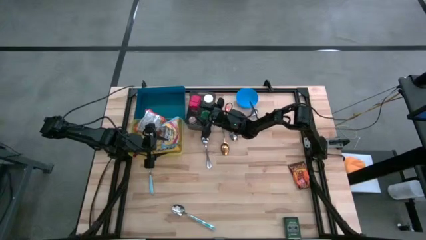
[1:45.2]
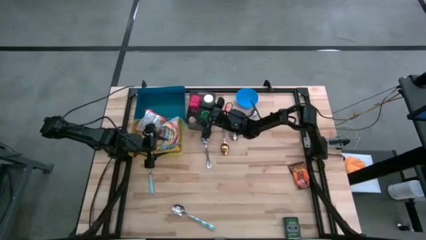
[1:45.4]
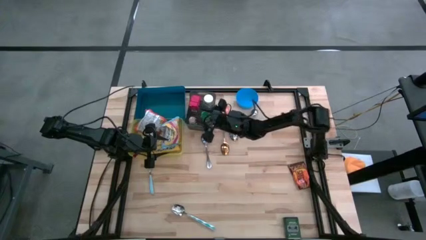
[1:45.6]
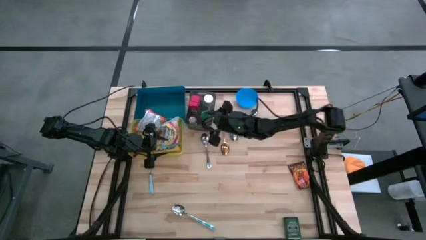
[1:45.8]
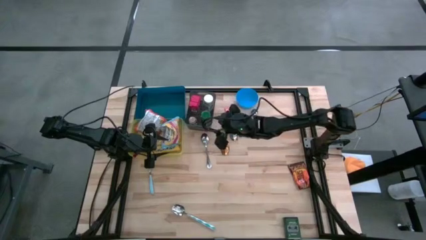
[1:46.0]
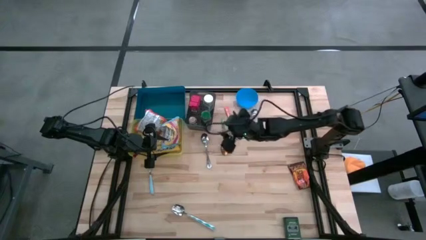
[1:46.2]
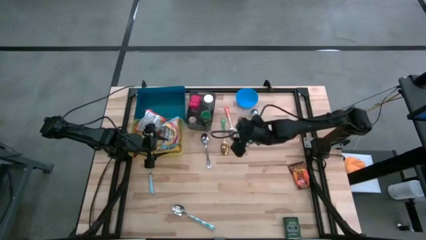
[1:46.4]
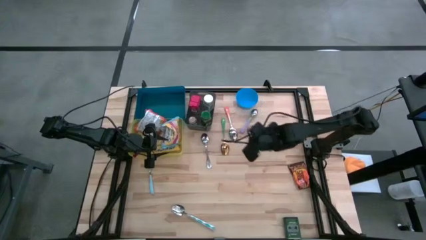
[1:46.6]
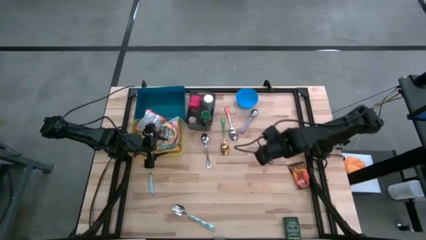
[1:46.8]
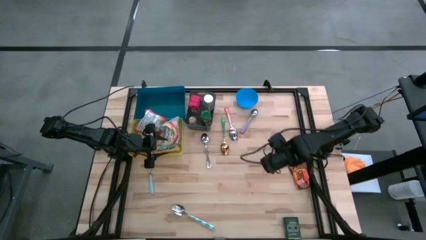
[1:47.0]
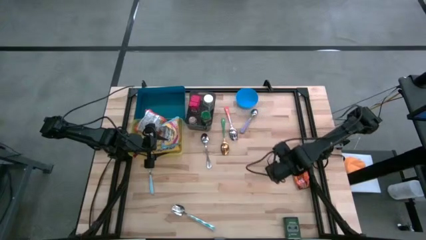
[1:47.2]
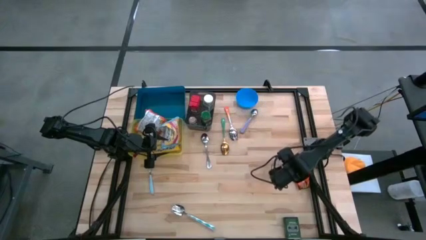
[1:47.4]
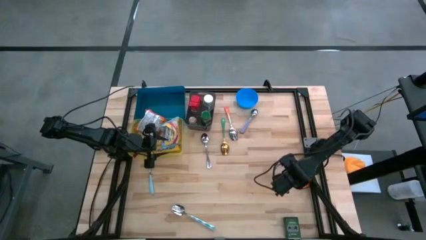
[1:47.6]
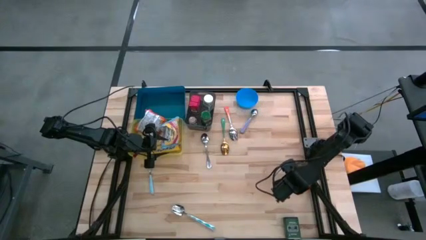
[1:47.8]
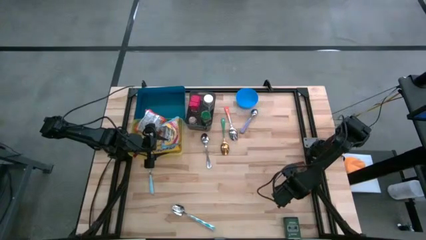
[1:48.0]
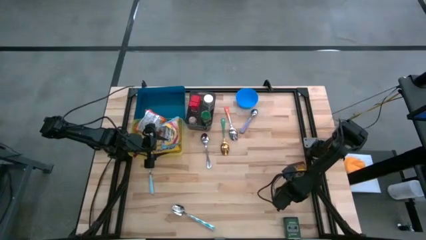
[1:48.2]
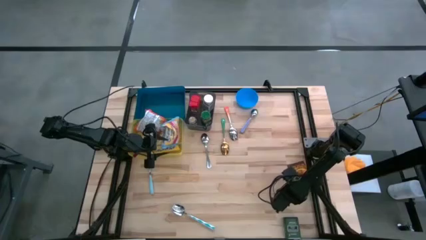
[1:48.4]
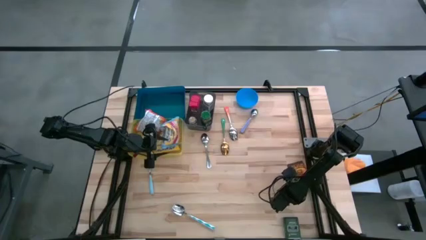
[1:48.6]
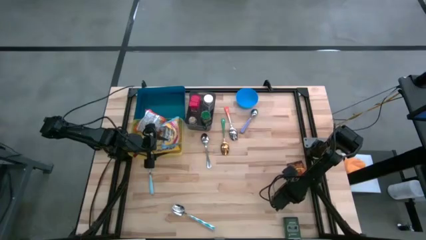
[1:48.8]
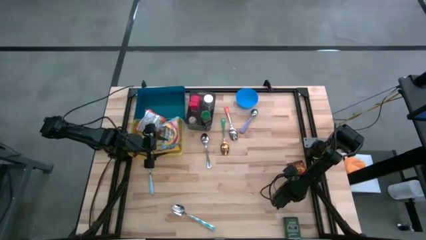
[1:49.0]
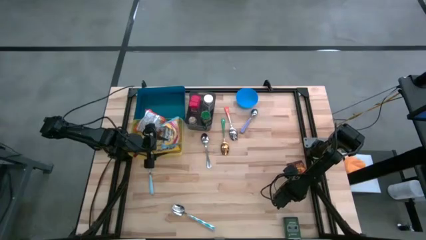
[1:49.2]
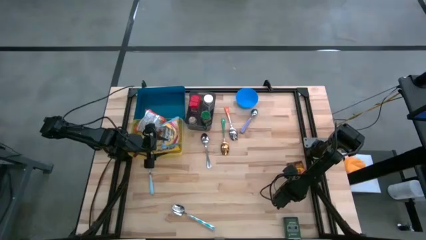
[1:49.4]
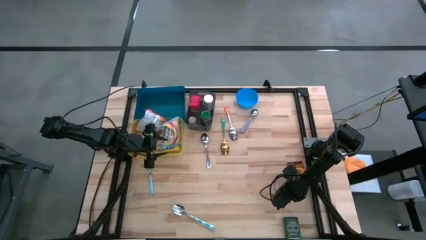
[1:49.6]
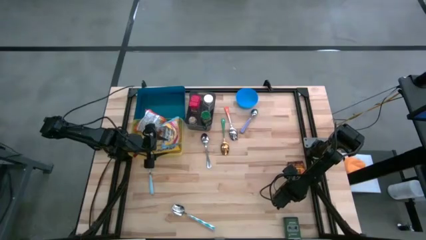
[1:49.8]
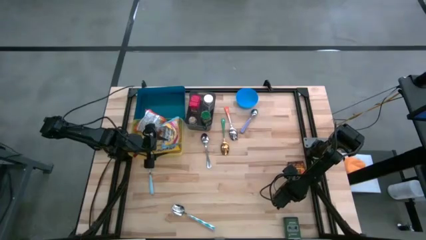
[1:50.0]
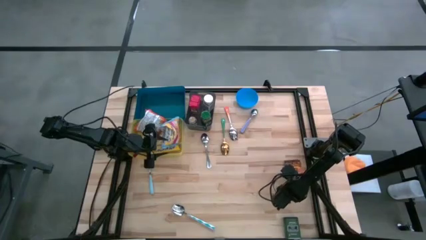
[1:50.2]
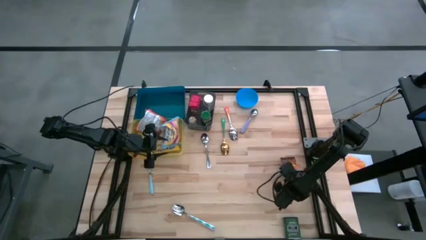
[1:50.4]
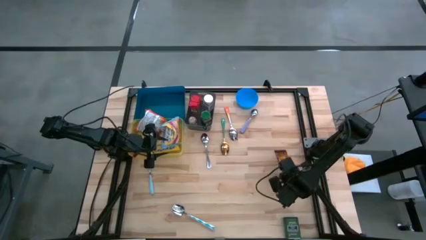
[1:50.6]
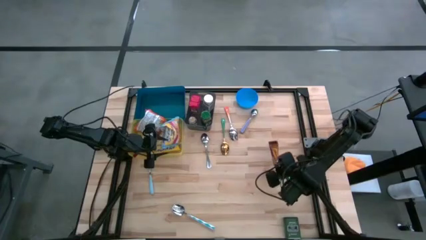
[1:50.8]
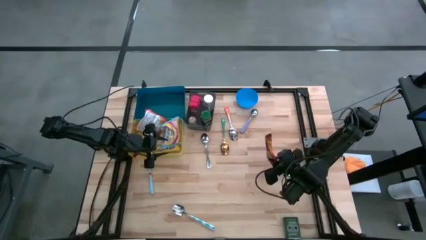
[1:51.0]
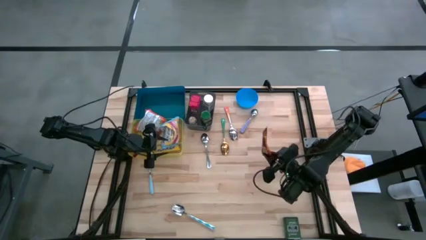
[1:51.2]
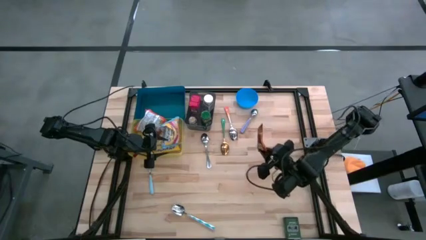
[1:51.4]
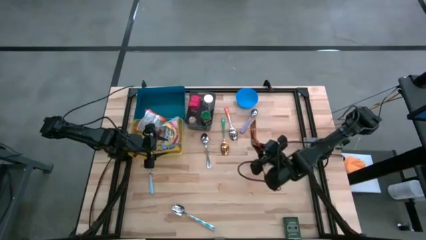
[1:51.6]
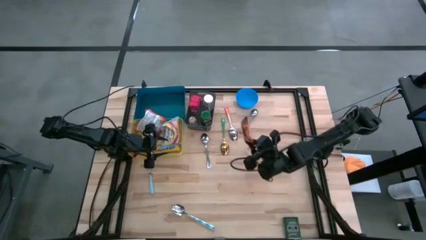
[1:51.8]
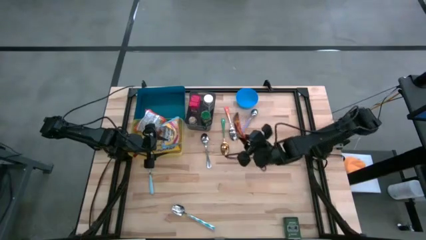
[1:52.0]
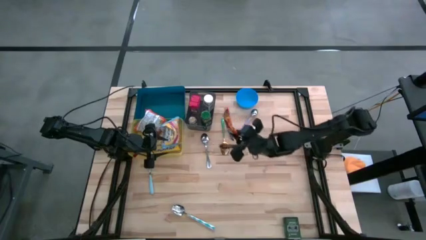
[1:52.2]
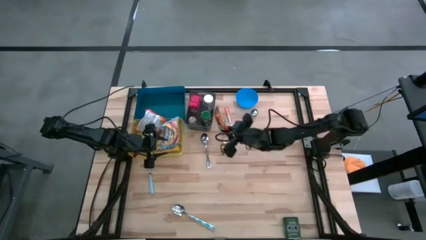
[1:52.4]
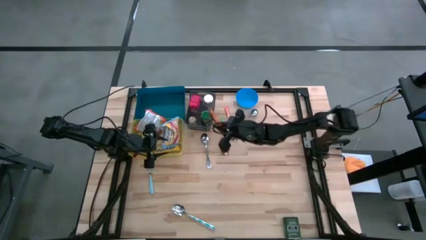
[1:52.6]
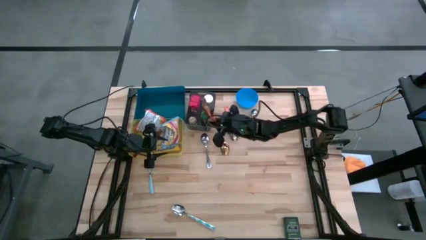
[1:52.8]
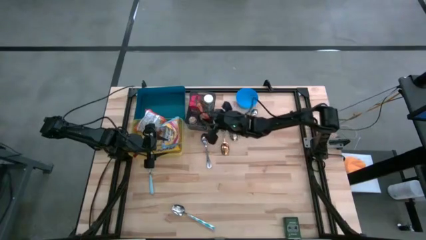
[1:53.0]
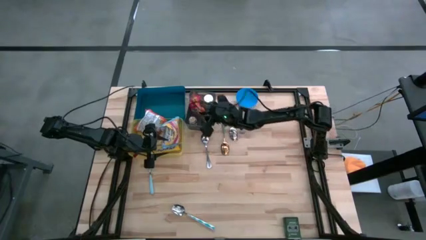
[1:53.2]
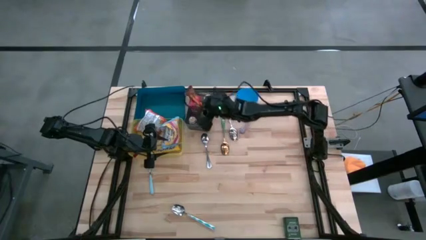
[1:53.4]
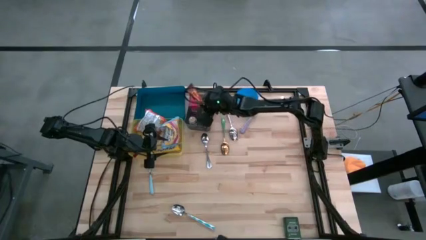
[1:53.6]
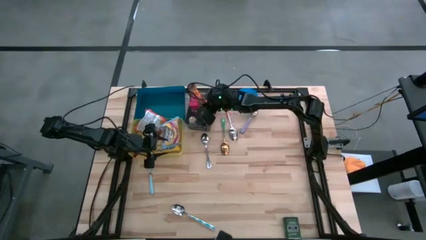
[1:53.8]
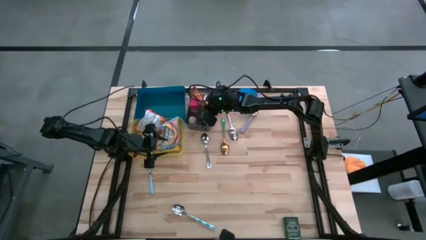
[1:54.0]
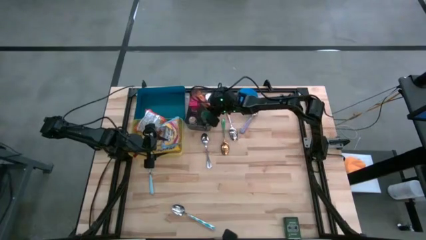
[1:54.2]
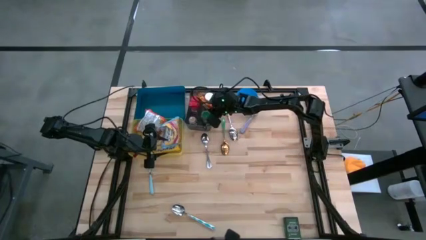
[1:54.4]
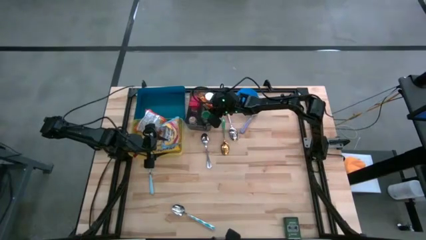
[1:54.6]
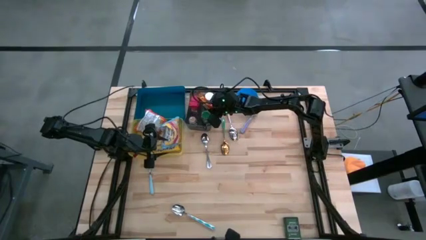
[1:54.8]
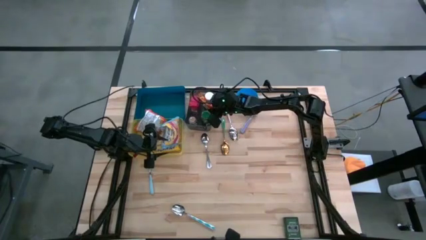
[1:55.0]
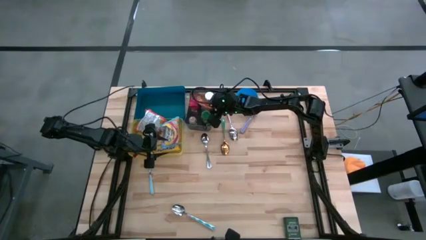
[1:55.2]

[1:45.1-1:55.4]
Put the orange seasoning bag into the black bin

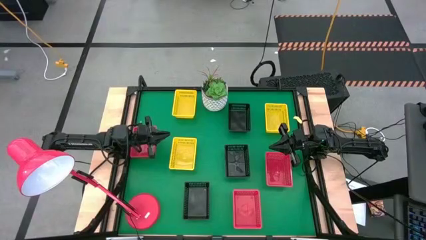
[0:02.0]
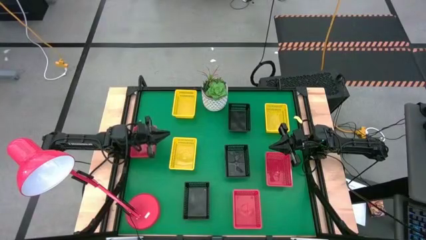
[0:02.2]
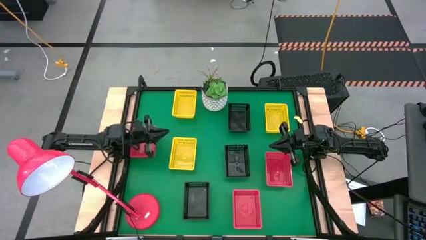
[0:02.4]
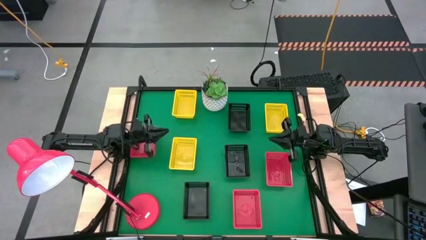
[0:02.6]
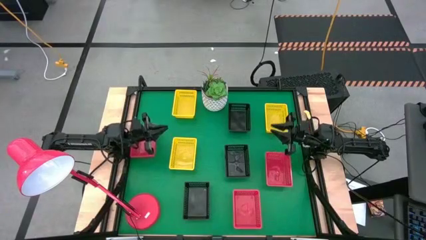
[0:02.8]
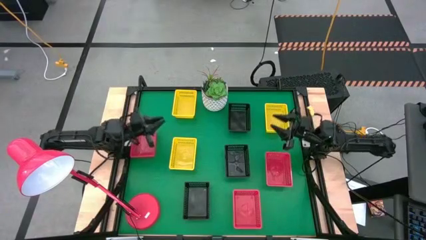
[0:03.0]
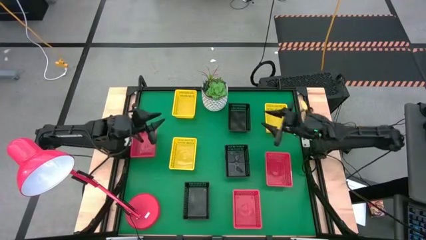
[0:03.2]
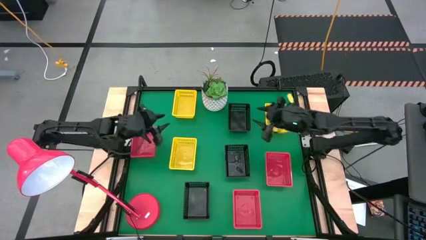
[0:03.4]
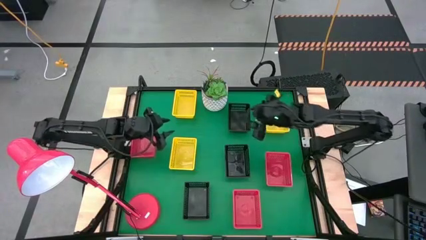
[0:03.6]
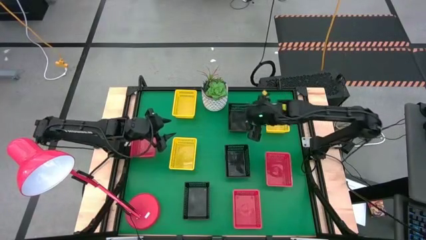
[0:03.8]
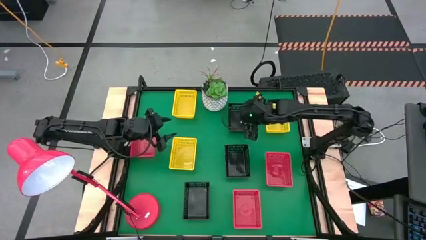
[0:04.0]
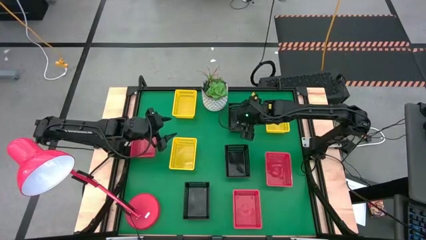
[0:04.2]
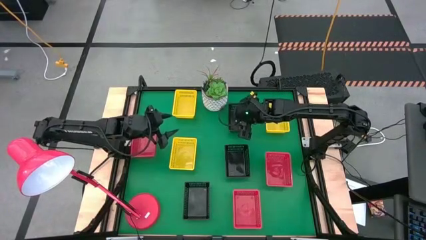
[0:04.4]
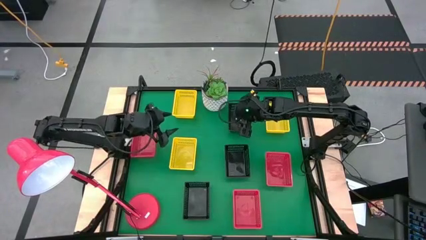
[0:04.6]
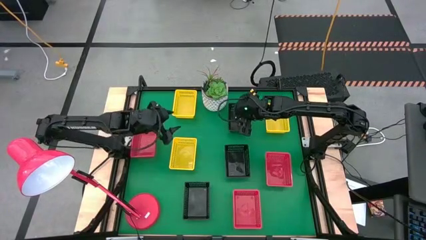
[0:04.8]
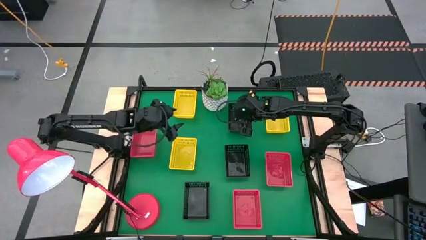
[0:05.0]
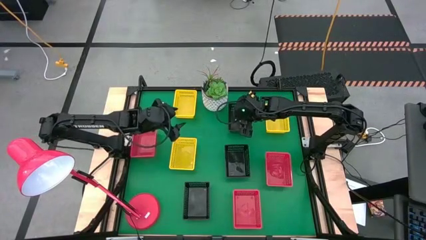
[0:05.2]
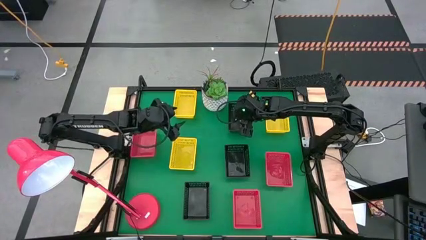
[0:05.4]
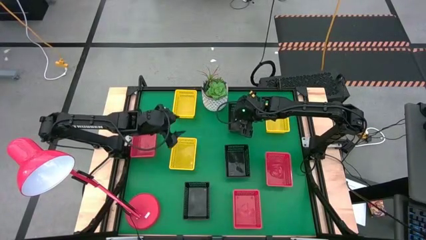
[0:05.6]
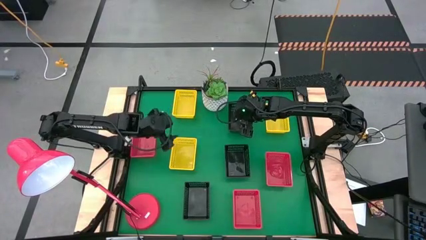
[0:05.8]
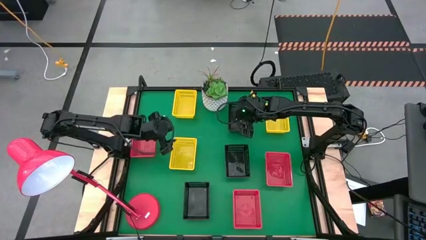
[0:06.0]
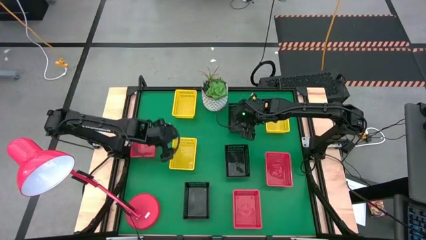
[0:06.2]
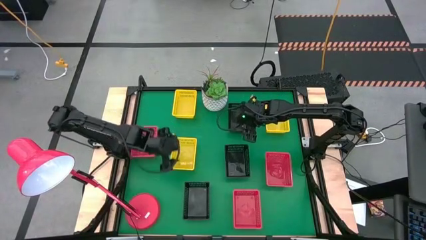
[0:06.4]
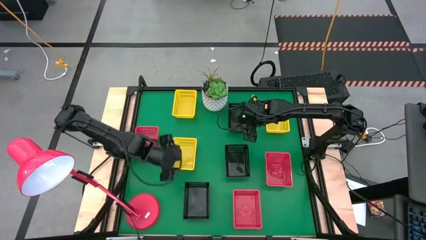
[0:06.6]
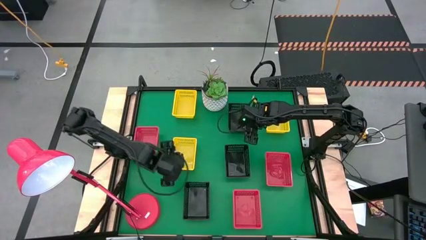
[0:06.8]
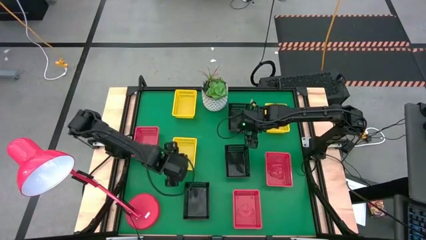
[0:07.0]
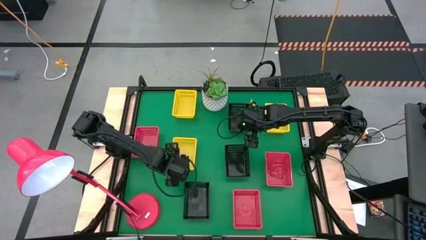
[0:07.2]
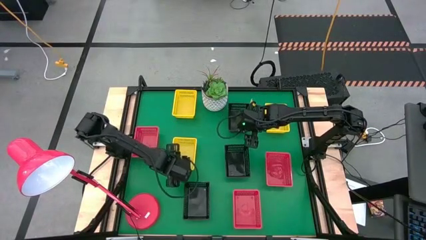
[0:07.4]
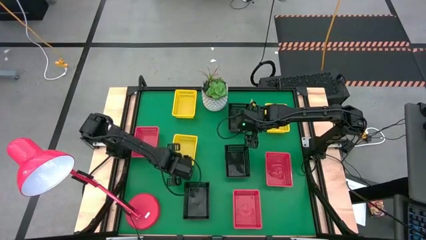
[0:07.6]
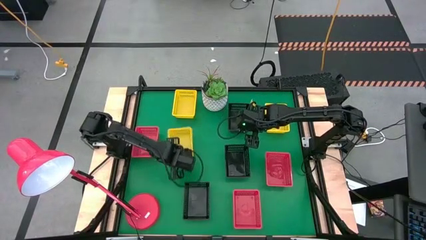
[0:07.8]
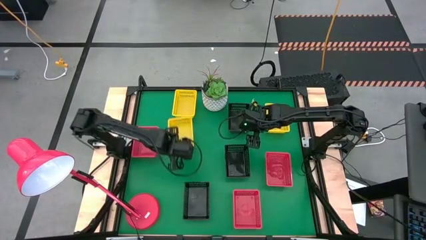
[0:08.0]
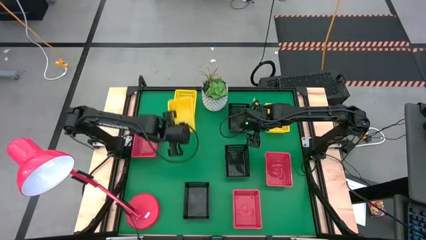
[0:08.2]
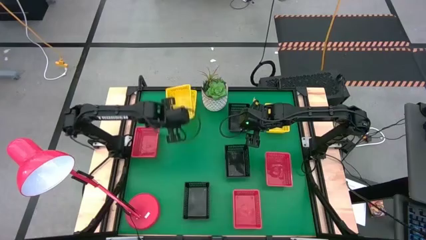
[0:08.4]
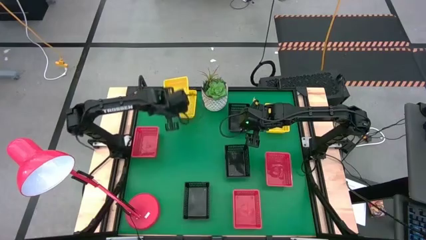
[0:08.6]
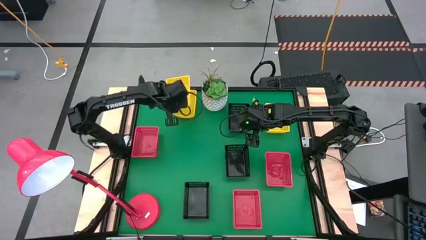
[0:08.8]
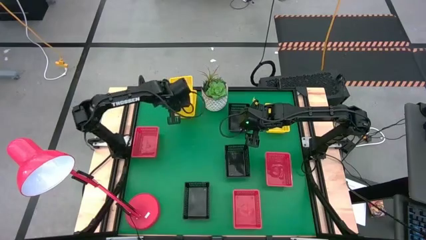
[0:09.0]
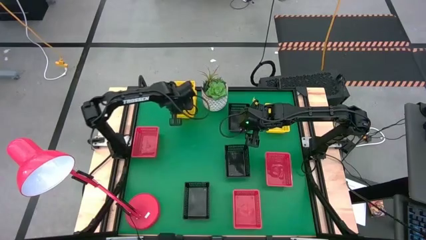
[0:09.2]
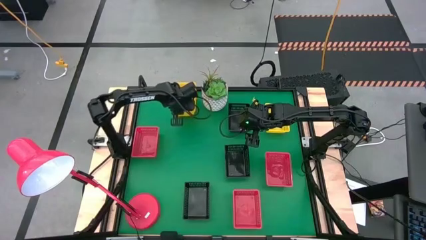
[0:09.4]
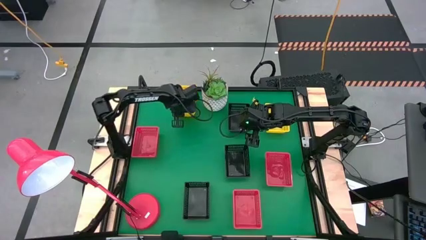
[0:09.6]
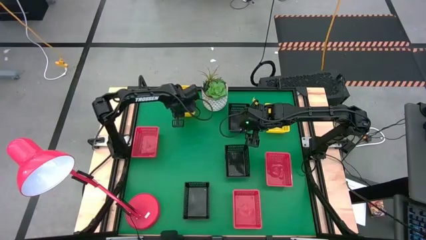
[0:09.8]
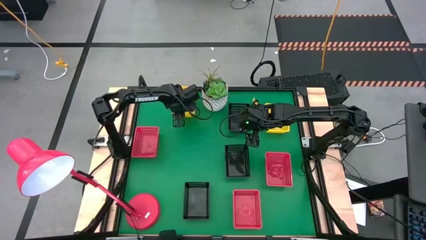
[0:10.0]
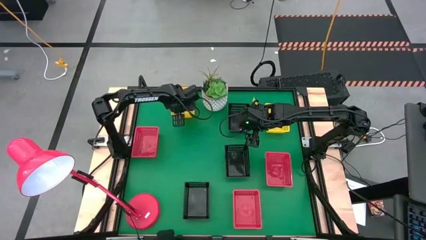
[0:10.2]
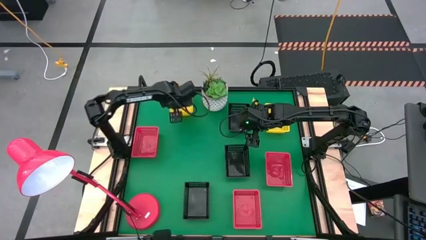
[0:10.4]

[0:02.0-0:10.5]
Stack the bottom yellow bin on the top yellow bin
